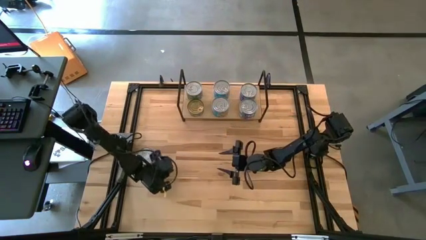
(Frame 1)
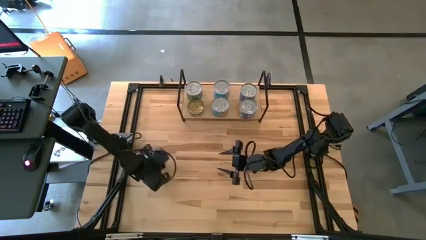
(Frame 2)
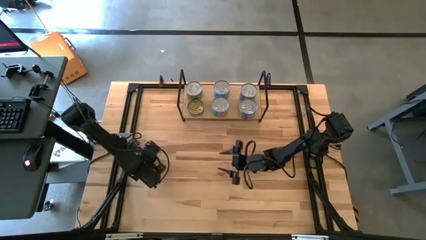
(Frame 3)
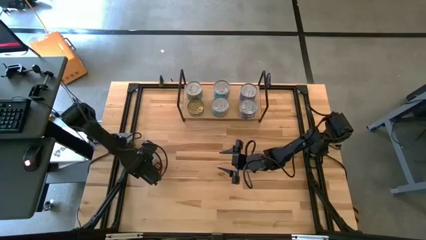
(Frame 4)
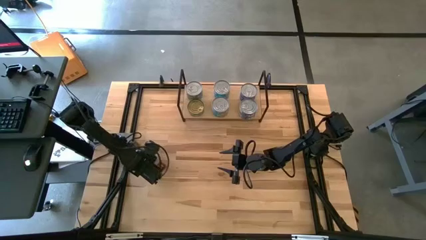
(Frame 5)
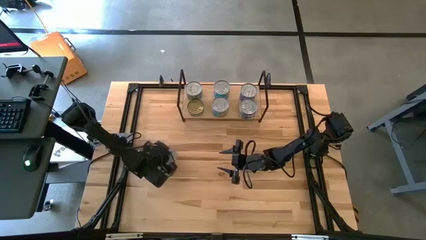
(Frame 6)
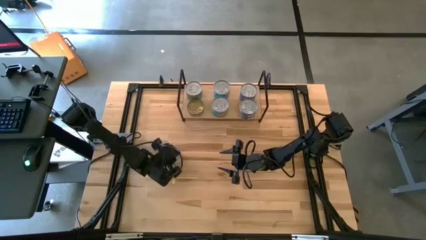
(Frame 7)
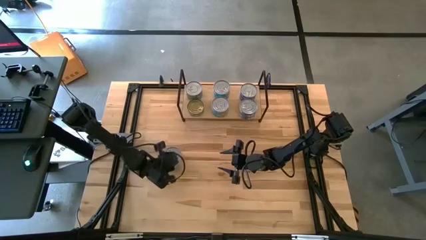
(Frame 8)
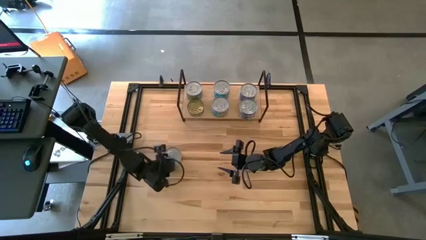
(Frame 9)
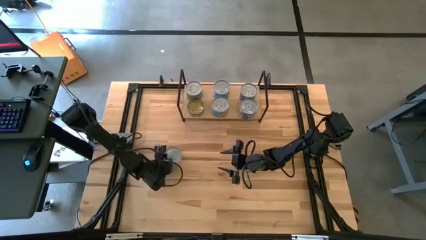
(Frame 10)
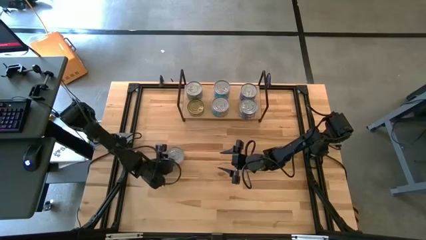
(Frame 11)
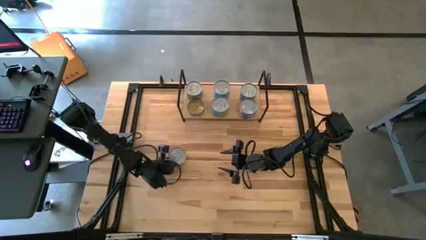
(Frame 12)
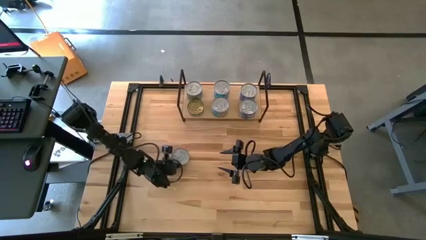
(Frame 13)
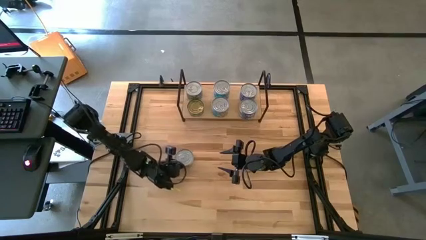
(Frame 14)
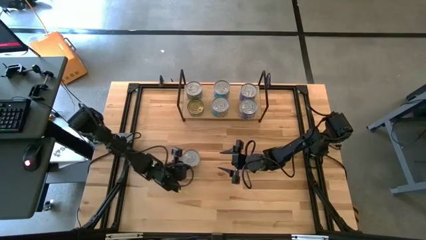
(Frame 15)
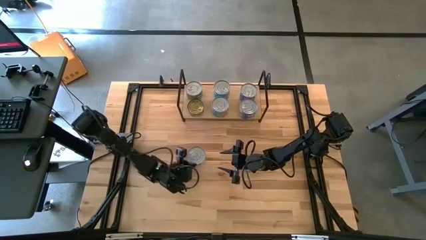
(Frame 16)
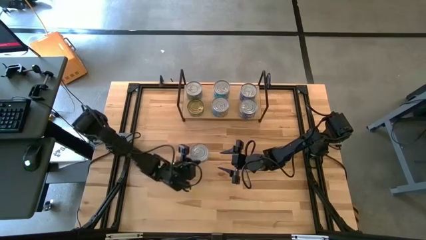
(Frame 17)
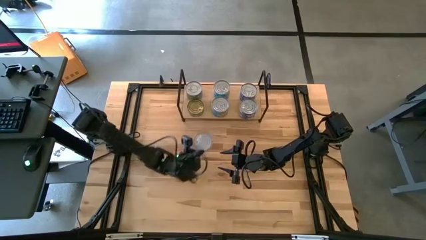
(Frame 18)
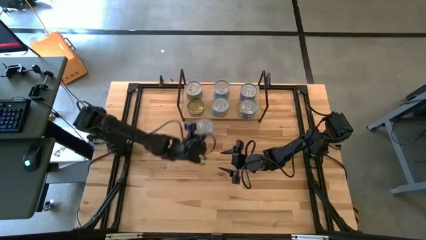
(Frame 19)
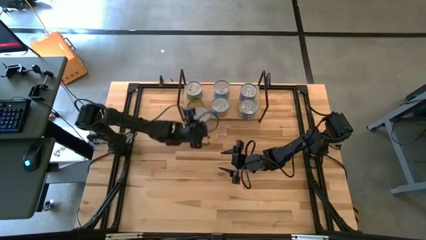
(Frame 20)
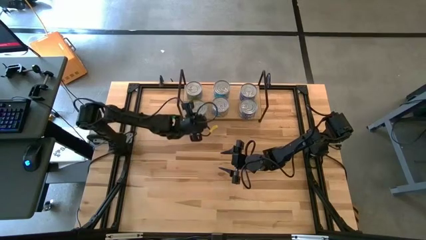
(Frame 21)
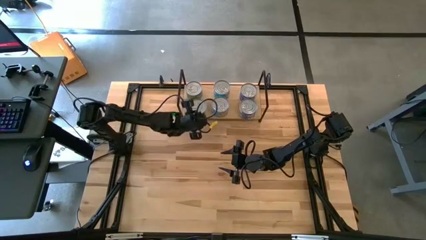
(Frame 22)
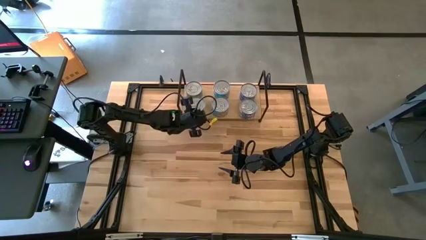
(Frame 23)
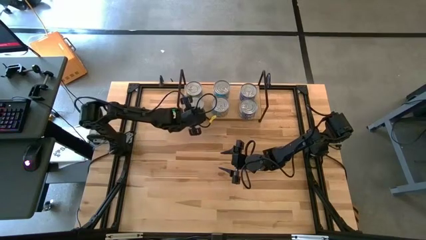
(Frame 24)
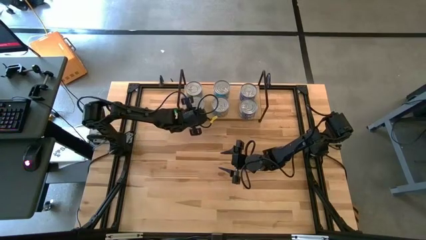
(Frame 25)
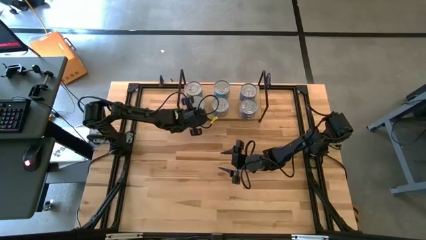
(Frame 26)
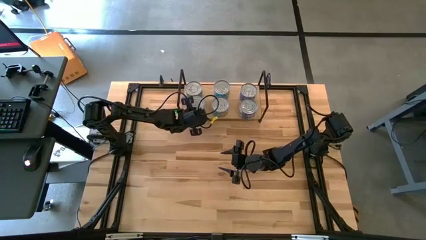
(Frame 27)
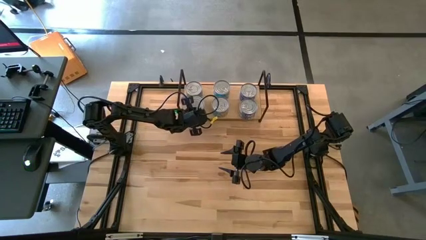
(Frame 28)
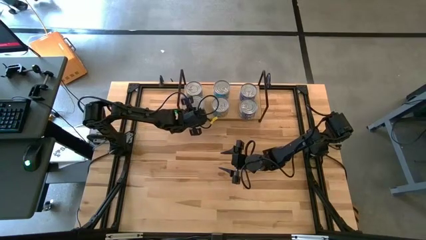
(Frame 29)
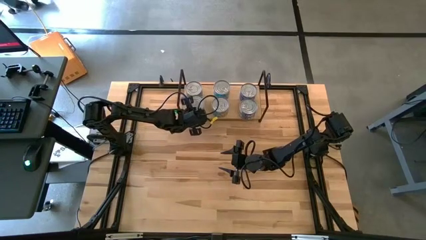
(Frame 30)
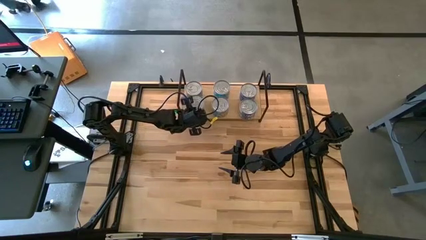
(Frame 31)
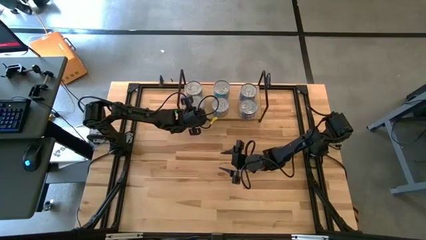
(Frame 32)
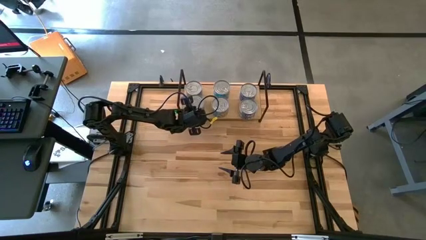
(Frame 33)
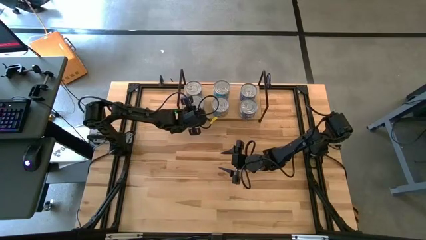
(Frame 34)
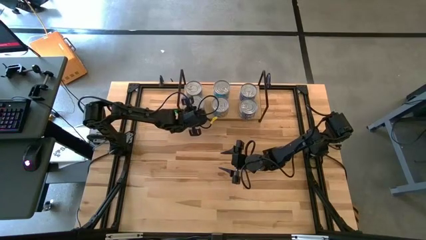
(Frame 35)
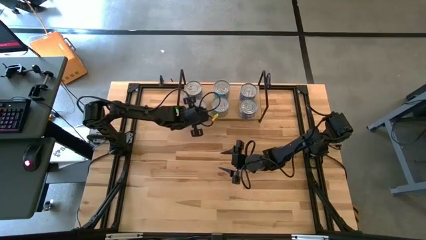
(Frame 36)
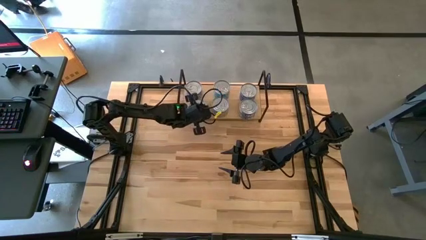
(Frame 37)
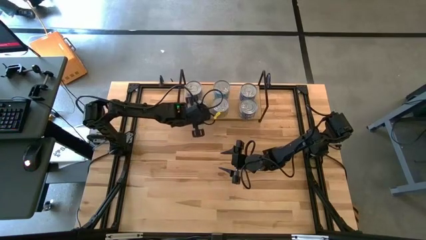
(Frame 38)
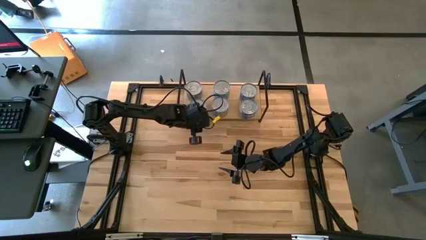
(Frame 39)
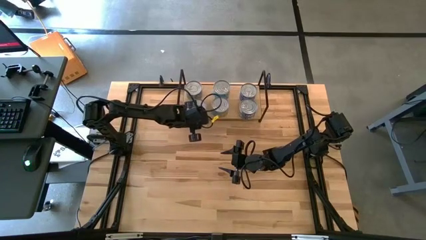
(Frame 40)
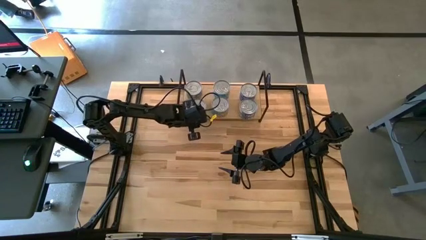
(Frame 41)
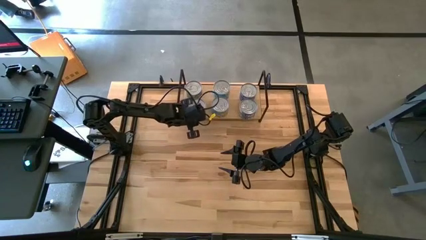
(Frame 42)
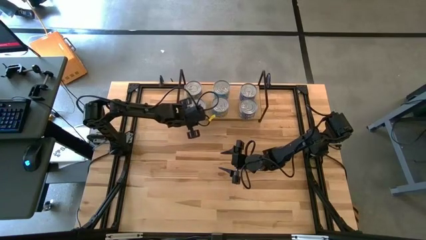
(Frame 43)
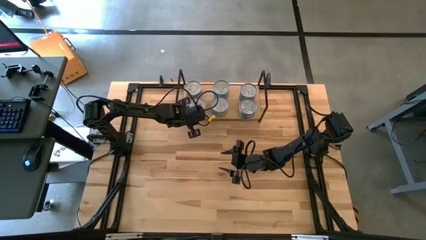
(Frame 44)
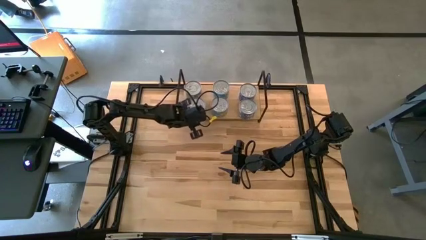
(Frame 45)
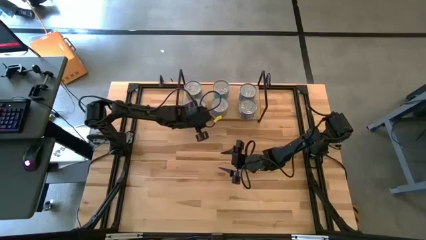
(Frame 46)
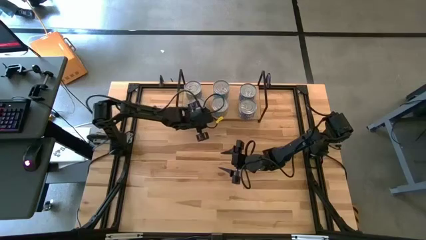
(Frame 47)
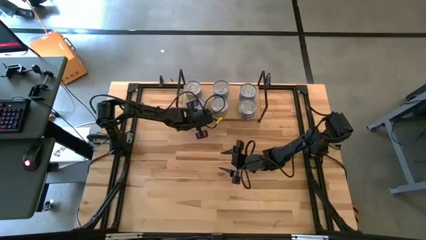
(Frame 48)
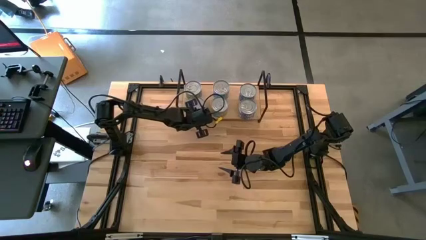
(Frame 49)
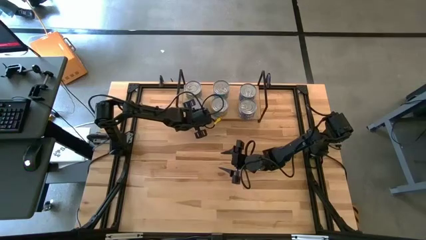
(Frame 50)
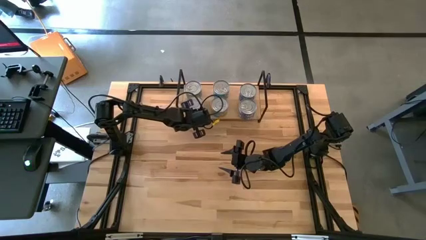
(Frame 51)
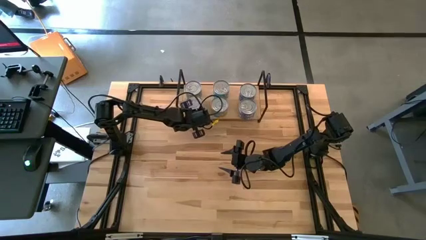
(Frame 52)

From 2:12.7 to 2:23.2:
Task: Stack canned seafood by type on shelf
Stack the green tuna can on top of the other green tuna can on the shelf
